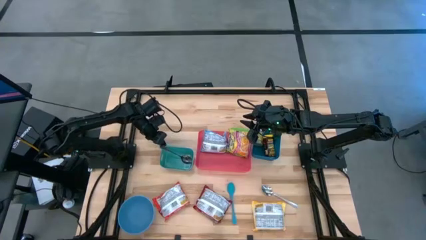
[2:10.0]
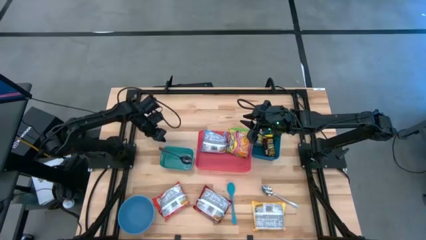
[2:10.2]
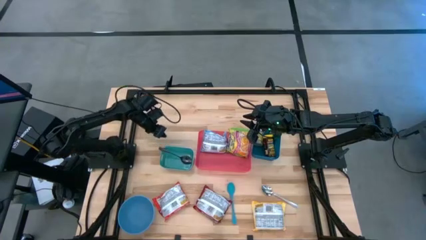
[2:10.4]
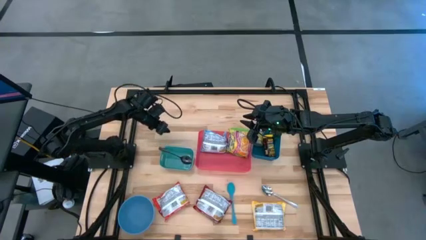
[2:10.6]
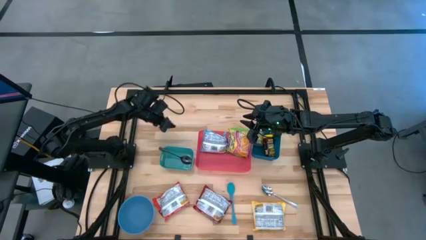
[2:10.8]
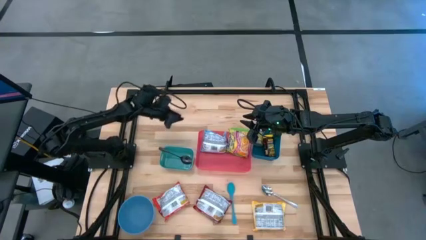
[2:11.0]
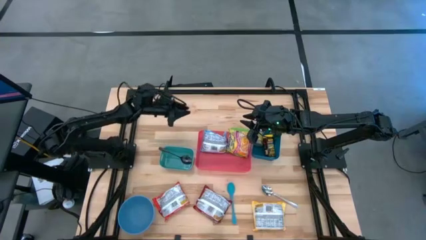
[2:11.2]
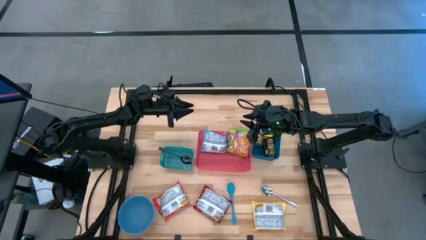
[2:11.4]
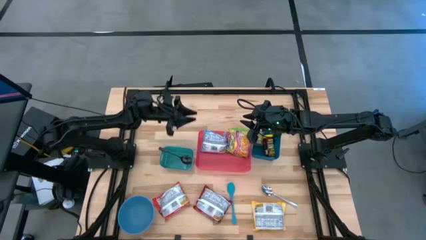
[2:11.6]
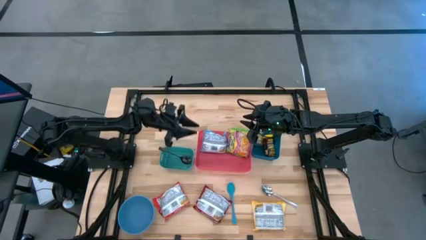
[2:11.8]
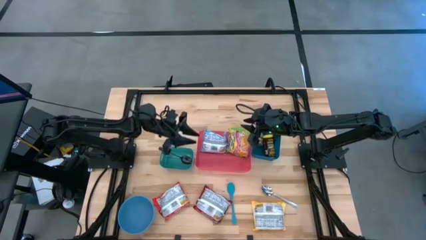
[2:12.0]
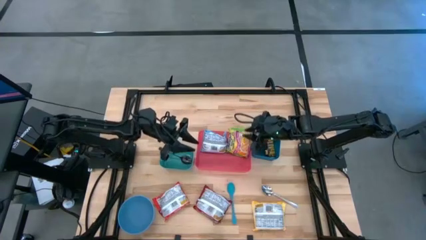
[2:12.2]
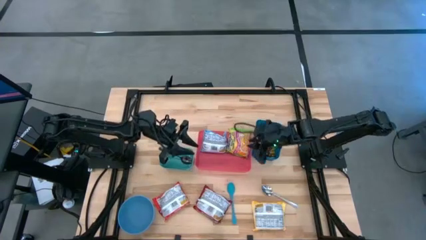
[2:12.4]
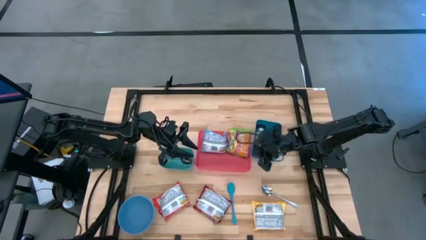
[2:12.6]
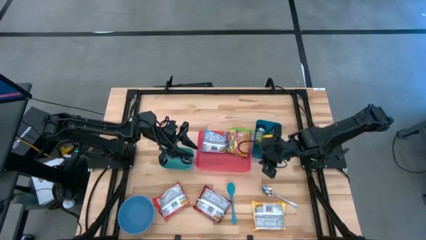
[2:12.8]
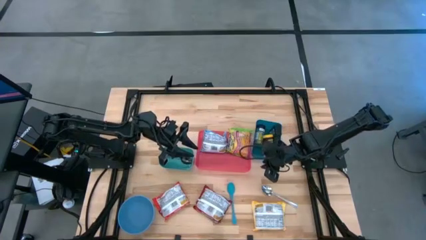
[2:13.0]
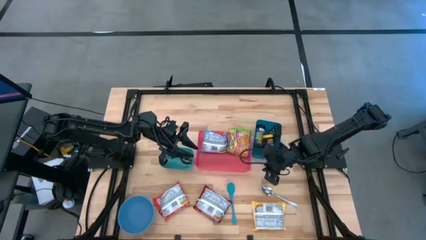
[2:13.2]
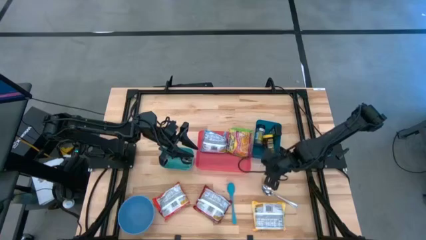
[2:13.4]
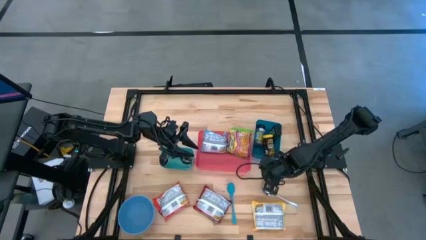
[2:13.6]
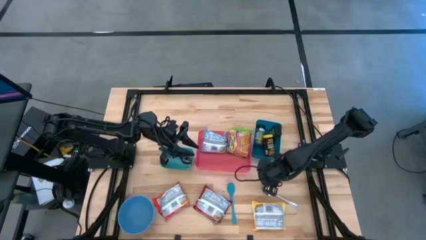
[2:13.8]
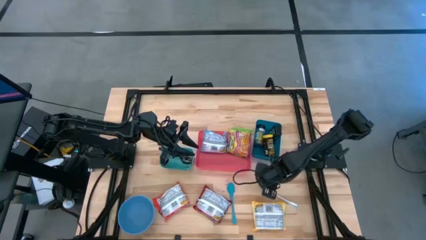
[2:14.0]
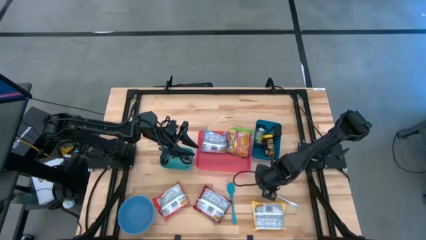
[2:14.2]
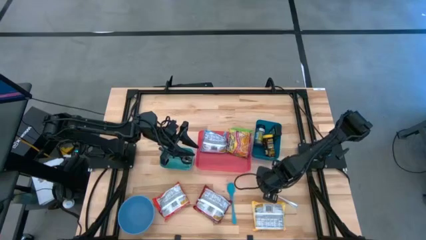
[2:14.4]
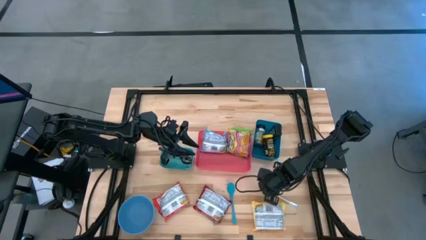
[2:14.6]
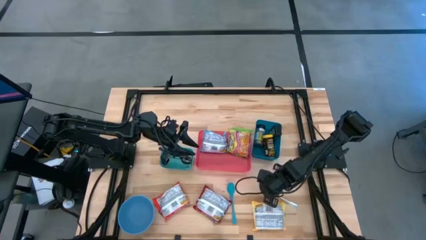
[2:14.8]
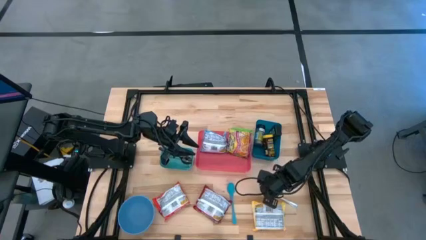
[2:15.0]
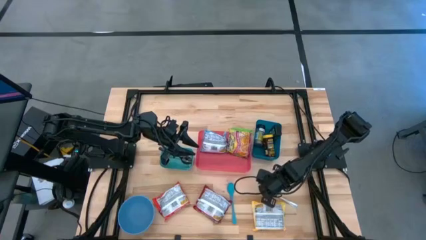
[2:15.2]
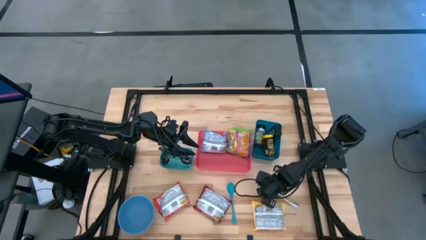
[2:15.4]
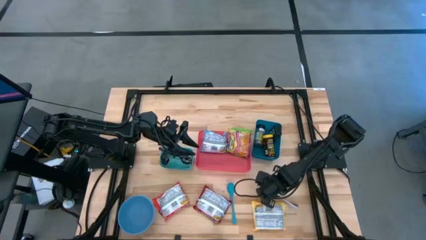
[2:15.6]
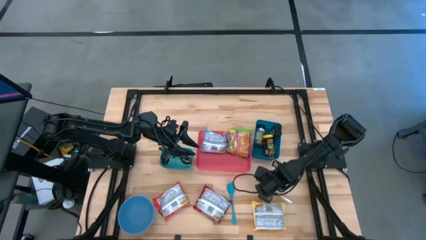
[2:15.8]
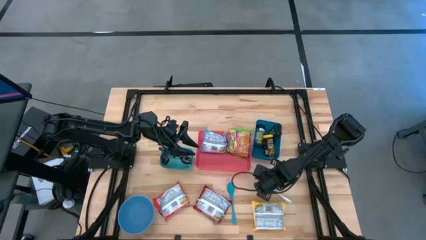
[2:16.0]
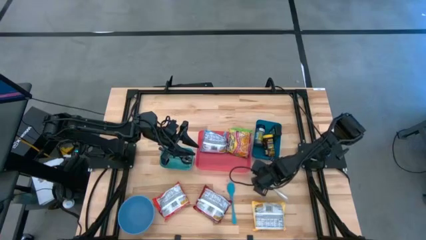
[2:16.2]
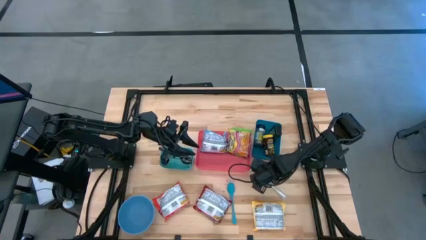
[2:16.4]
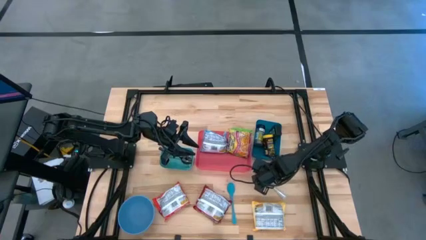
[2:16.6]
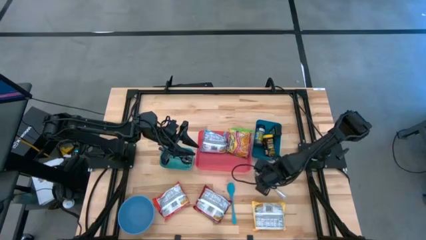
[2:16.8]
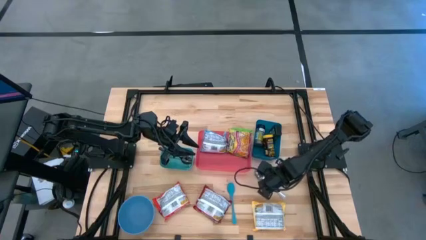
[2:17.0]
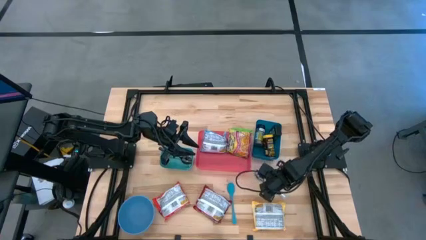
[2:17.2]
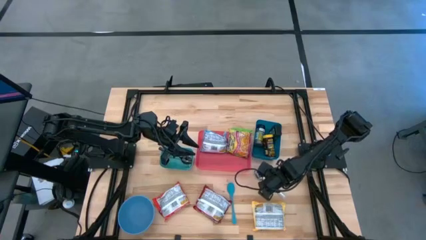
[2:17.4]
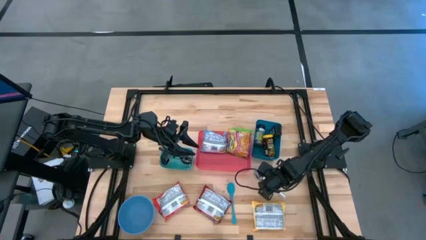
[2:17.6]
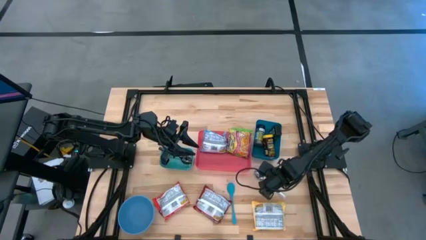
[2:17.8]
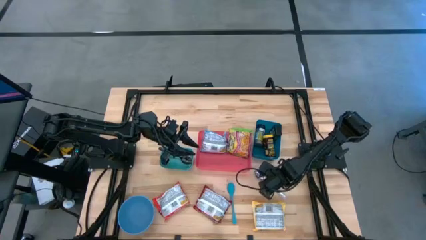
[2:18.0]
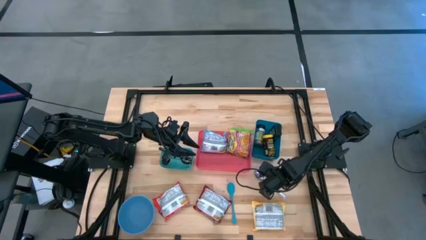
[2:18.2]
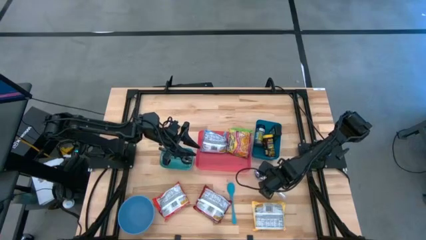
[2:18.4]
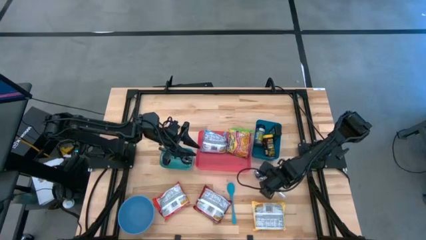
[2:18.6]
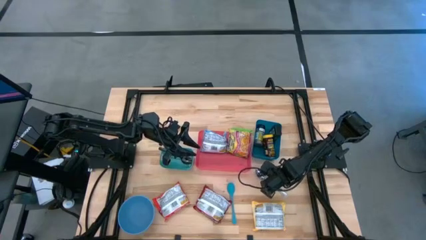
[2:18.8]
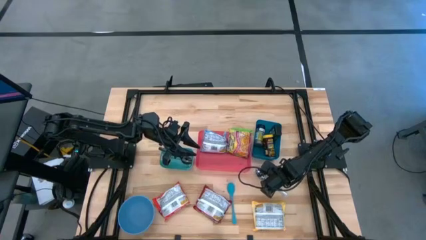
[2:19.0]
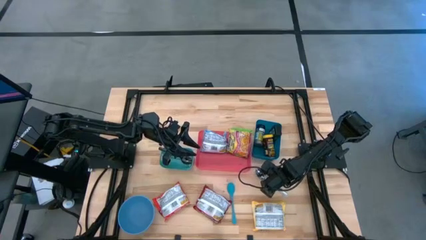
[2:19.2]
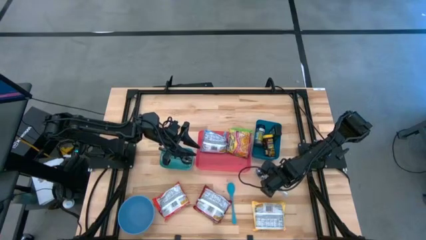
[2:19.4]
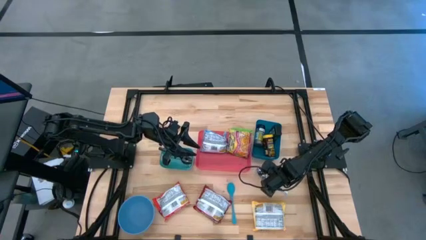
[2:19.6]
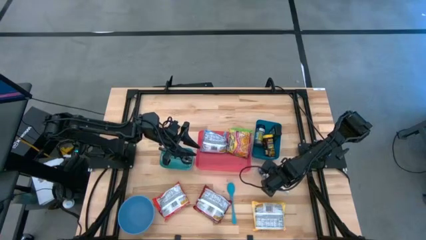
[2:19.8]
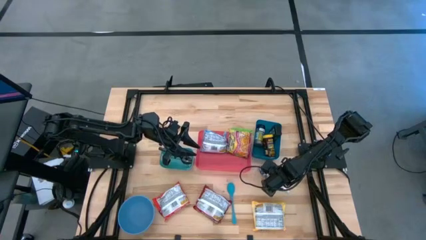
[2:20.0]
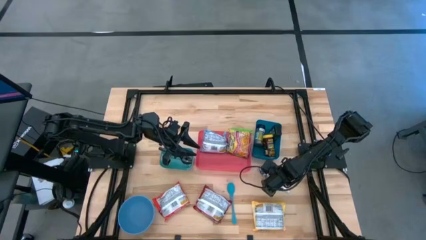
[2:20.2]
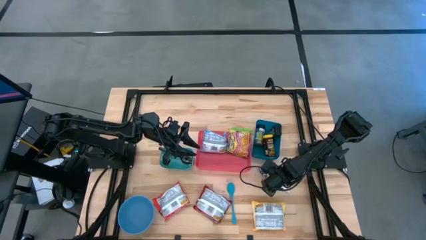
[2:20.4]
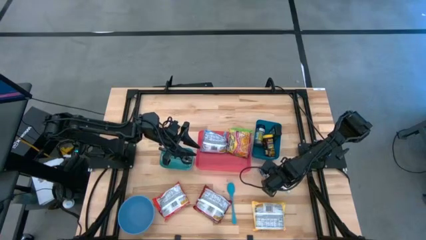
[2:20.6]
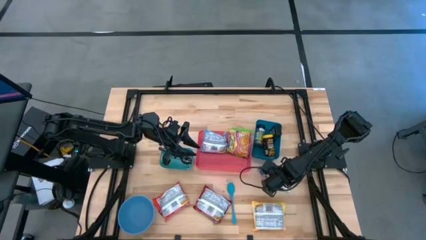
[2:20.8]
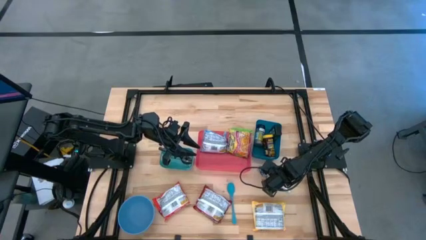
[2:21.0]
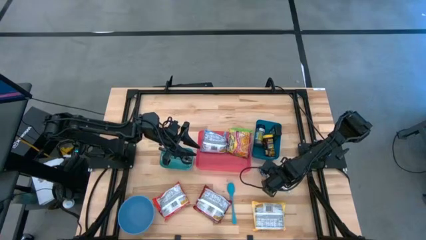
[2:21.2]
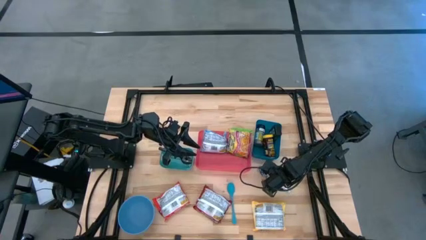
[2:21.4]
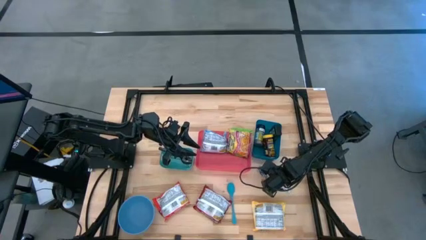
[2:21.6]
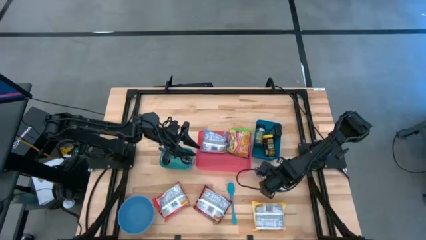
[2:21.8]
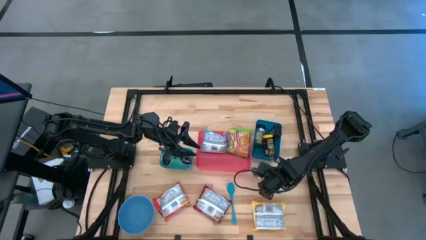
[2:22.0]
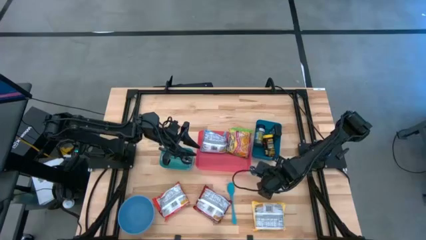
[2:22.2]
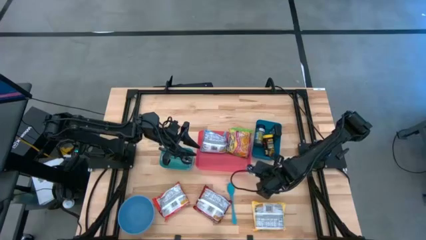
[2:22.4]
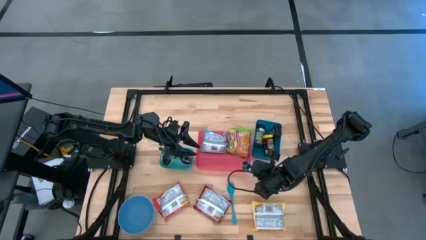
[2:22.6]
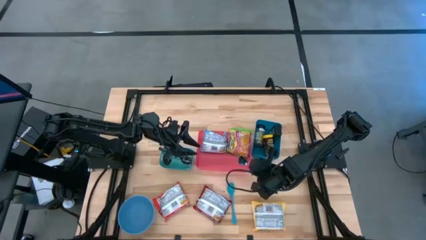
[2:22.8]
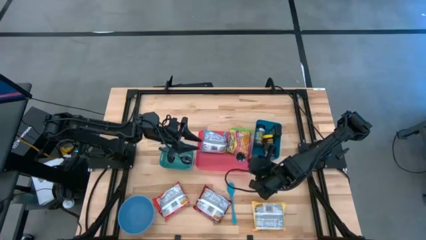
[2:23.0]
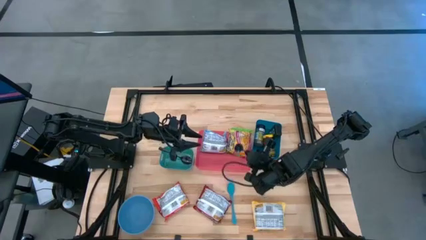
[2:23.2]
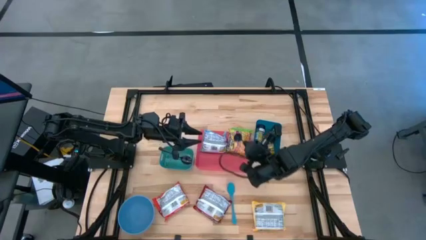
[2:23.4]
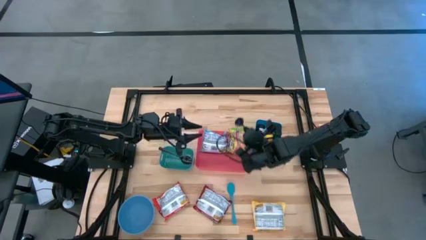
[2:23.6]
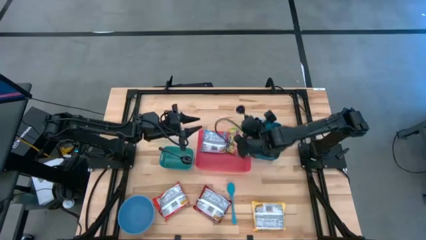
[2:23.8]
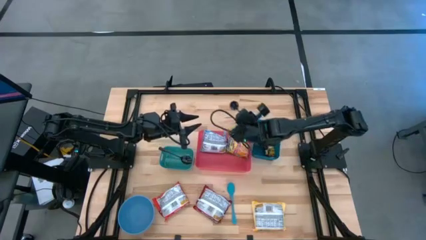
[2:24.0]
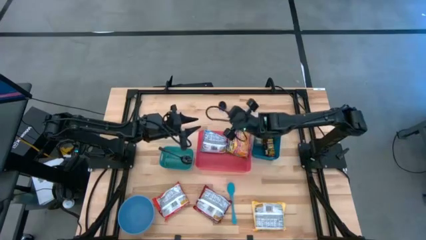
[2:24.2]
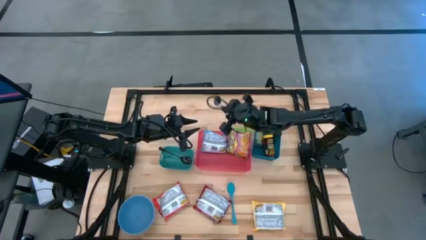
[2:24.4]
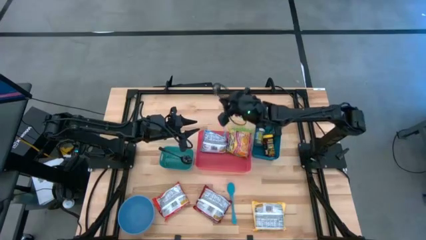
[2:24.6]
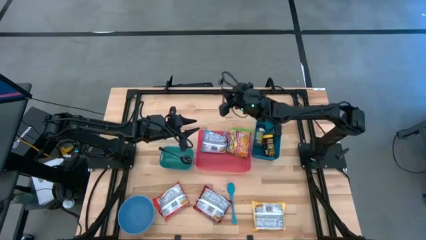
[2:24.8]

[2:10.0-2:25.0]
Task: Pick & Place Food Item
Put the silver spoon into the green bin
